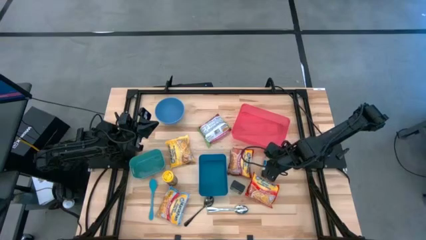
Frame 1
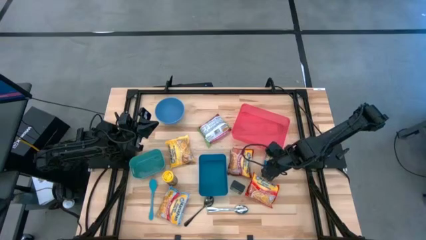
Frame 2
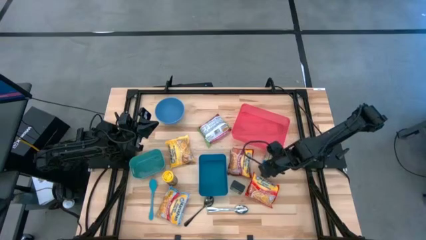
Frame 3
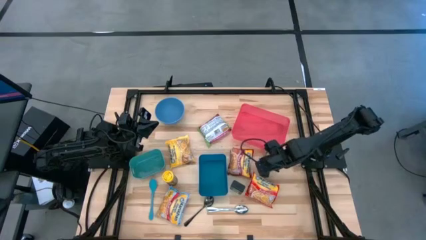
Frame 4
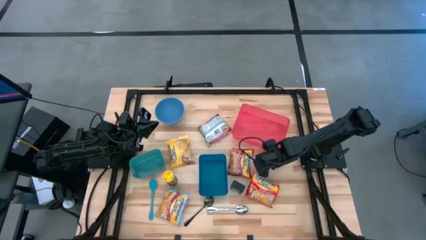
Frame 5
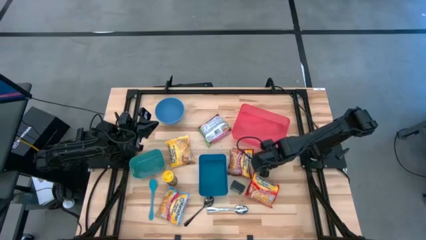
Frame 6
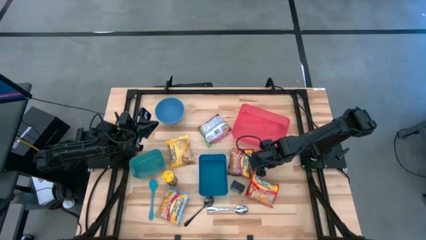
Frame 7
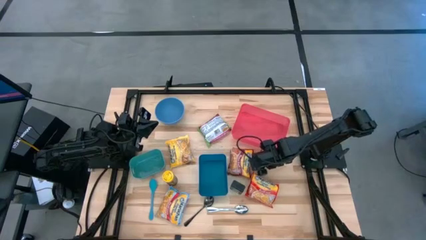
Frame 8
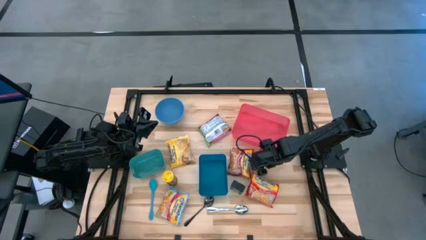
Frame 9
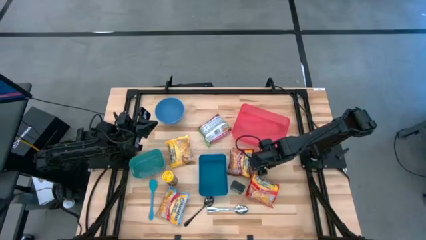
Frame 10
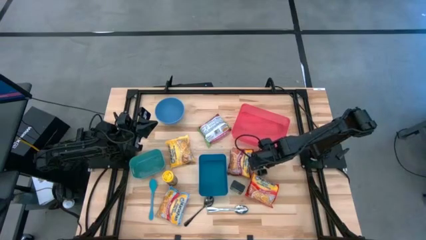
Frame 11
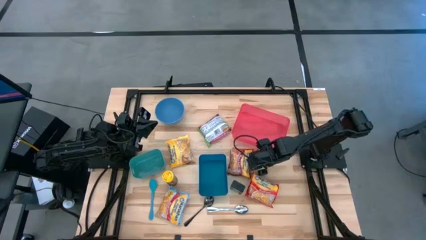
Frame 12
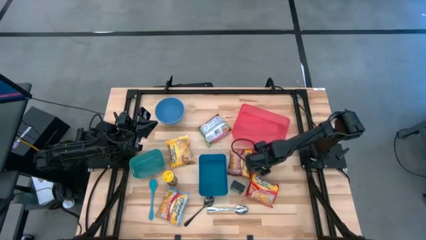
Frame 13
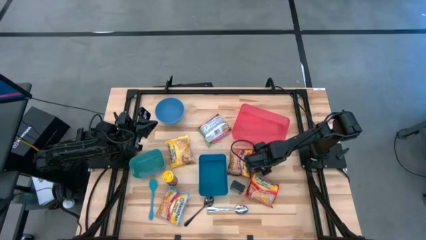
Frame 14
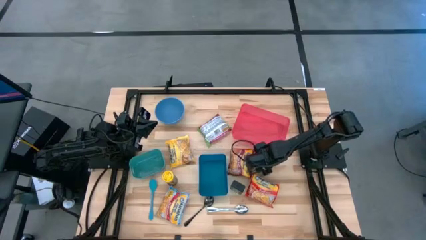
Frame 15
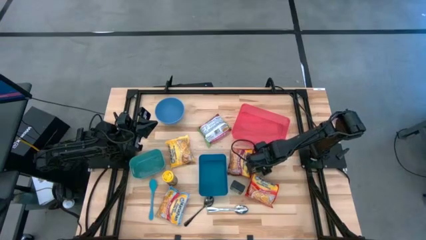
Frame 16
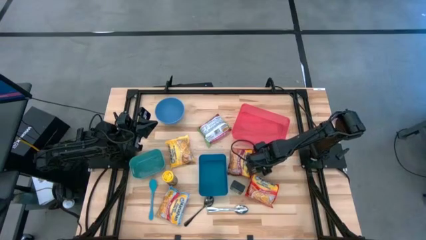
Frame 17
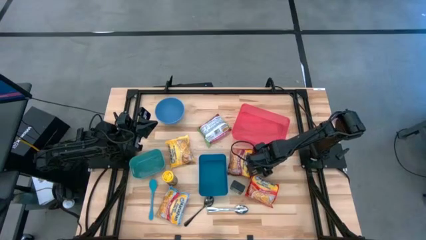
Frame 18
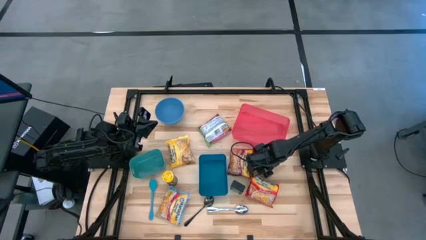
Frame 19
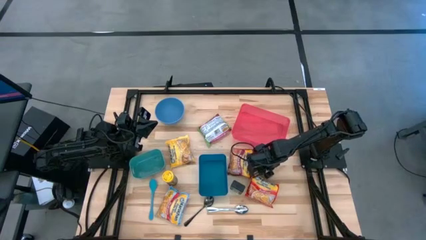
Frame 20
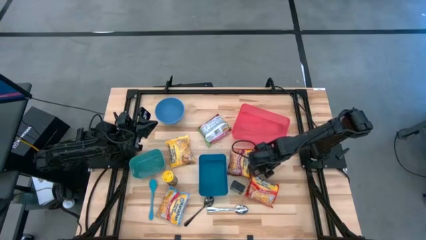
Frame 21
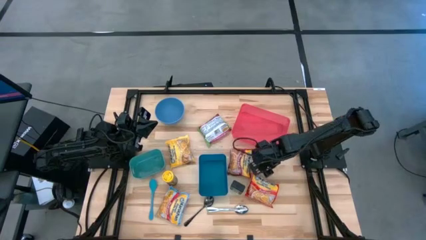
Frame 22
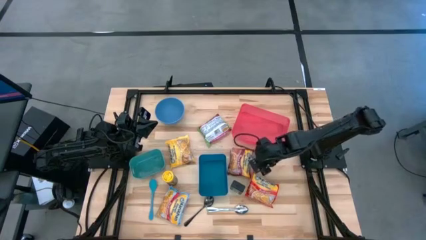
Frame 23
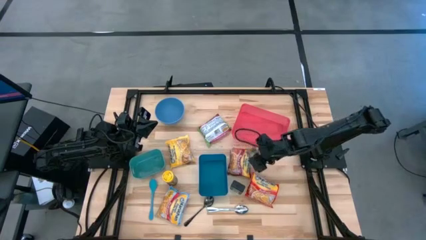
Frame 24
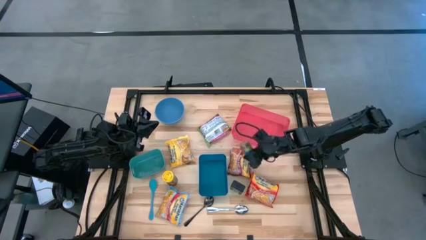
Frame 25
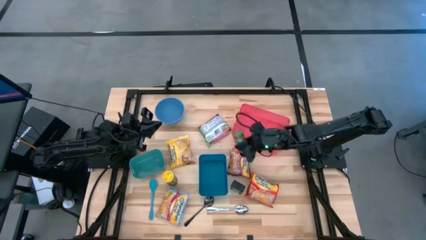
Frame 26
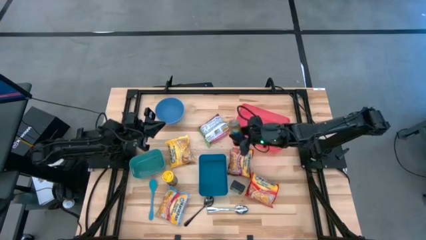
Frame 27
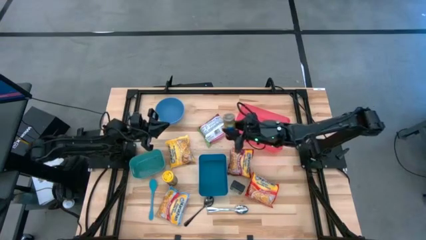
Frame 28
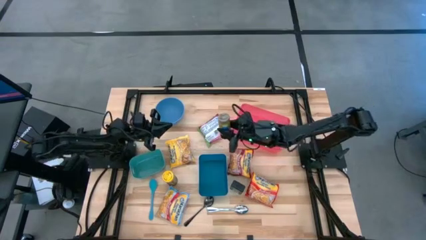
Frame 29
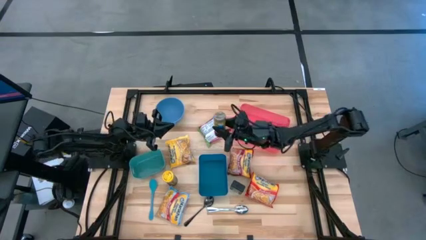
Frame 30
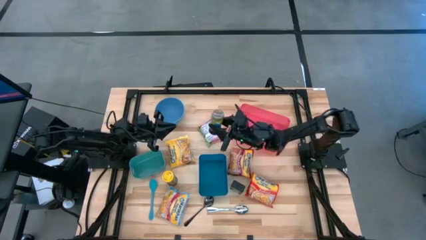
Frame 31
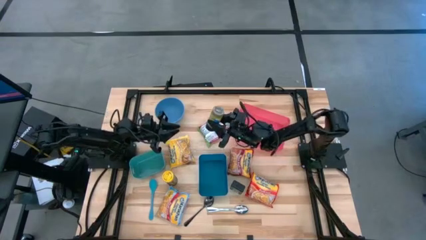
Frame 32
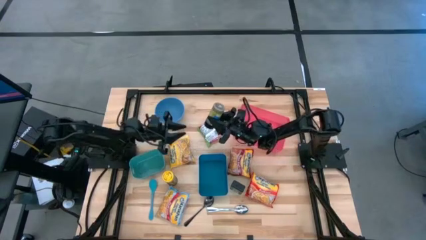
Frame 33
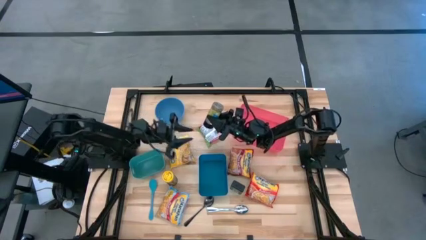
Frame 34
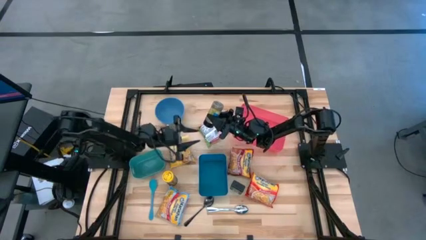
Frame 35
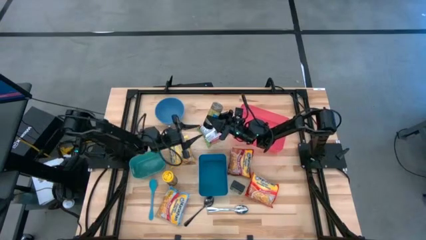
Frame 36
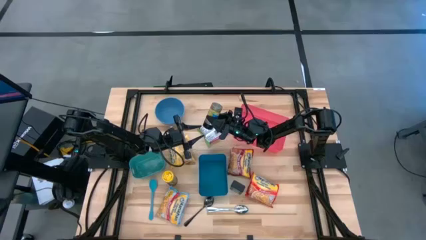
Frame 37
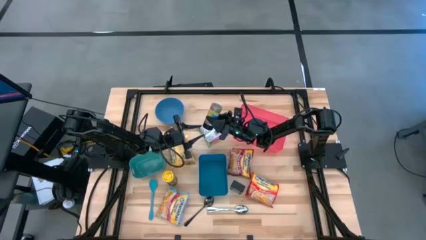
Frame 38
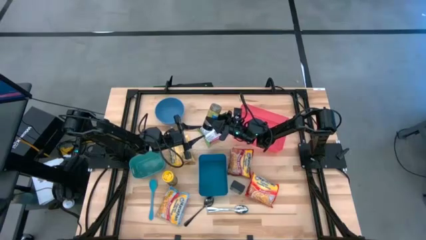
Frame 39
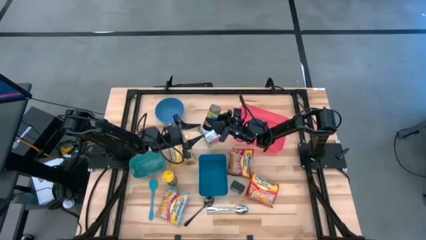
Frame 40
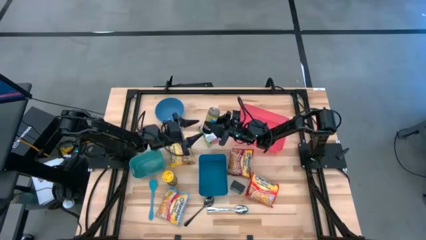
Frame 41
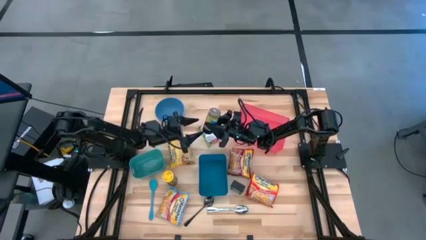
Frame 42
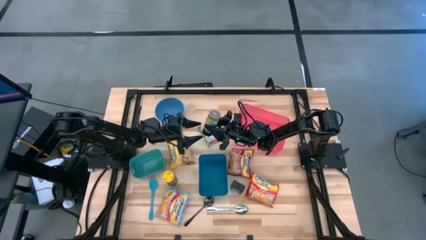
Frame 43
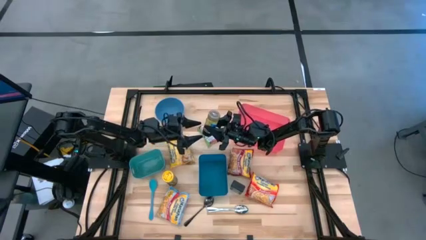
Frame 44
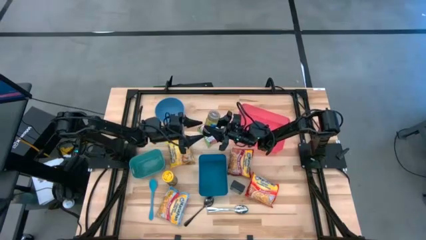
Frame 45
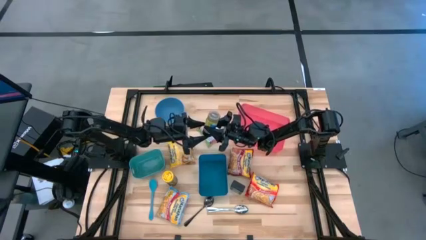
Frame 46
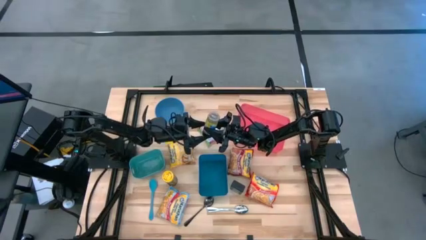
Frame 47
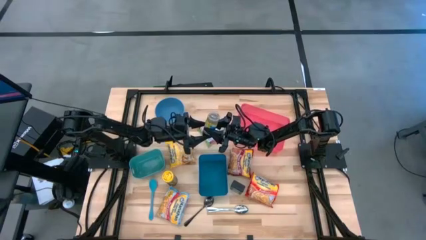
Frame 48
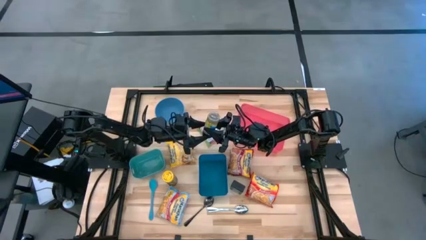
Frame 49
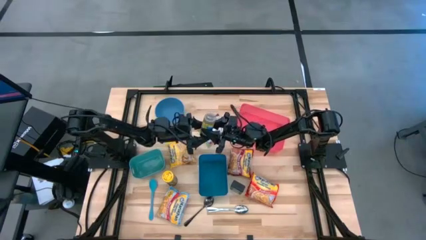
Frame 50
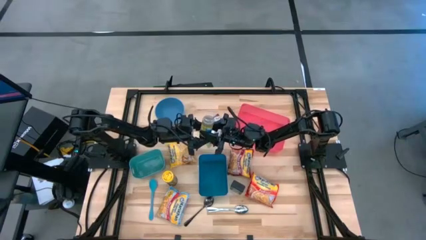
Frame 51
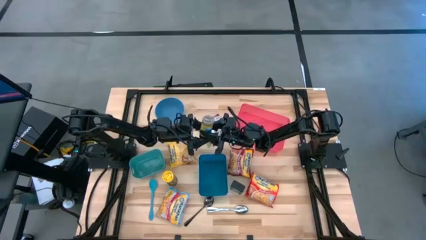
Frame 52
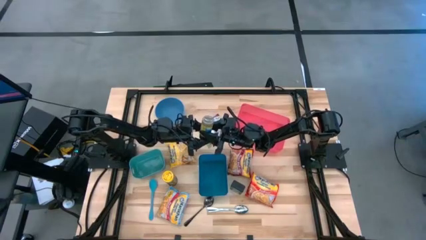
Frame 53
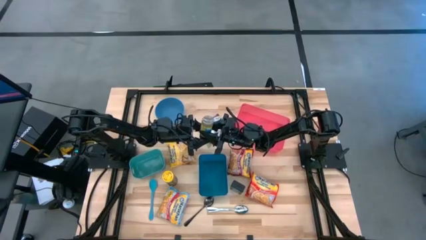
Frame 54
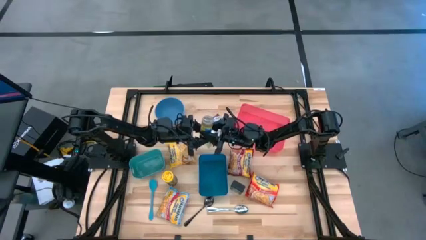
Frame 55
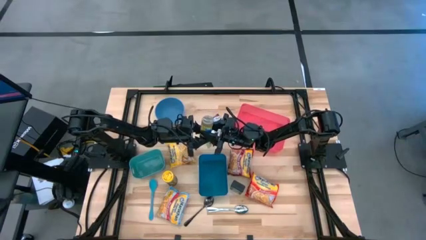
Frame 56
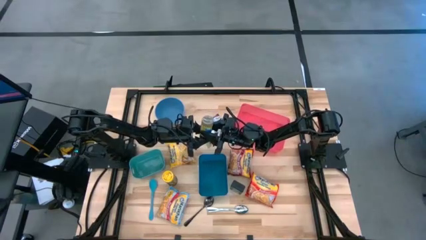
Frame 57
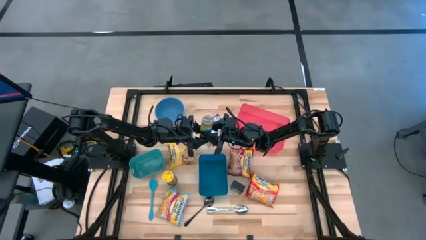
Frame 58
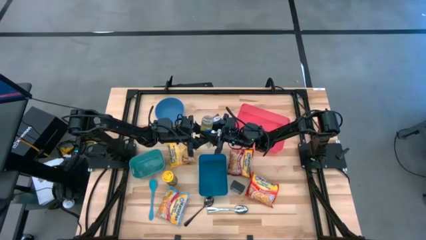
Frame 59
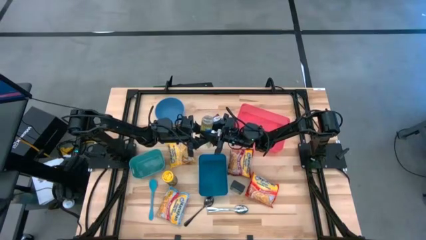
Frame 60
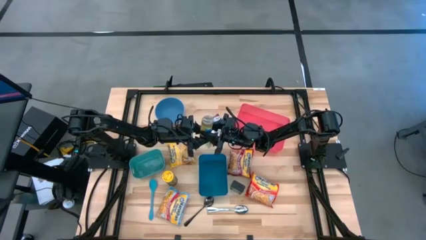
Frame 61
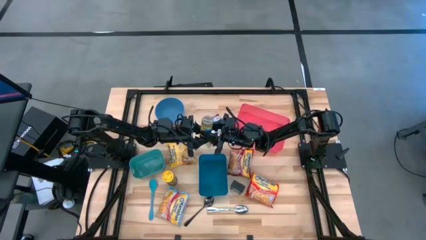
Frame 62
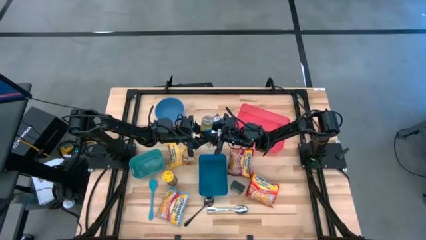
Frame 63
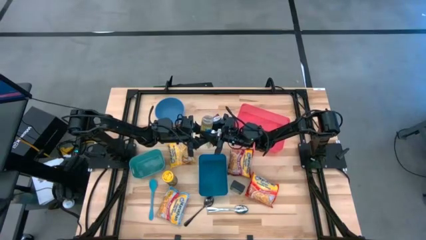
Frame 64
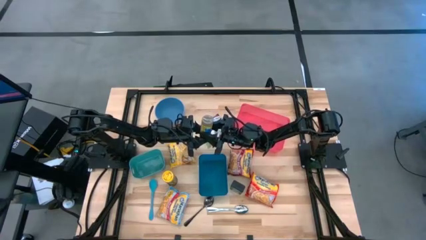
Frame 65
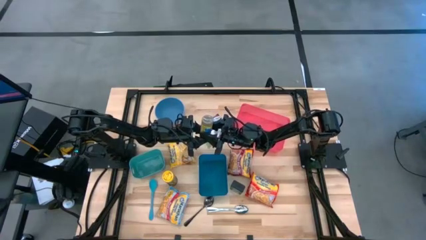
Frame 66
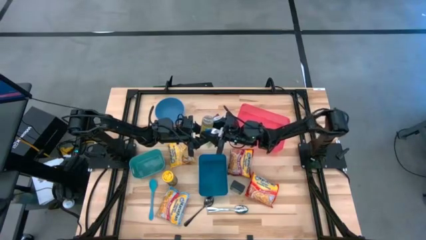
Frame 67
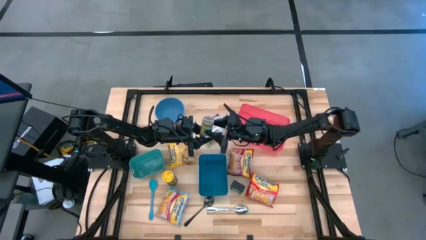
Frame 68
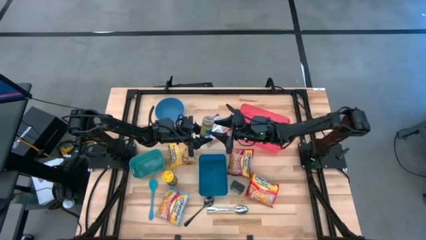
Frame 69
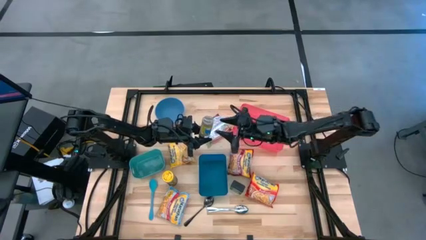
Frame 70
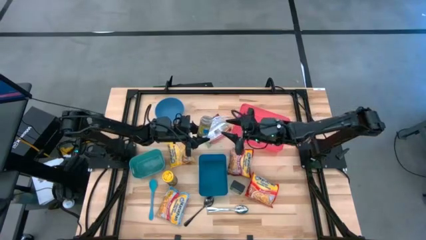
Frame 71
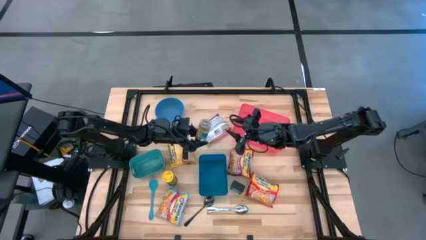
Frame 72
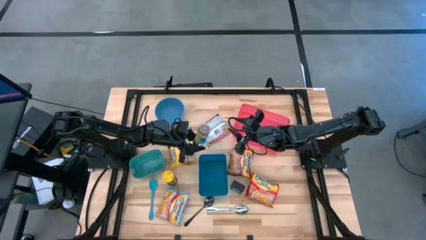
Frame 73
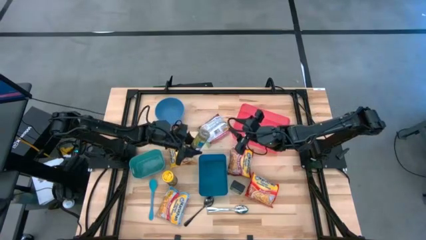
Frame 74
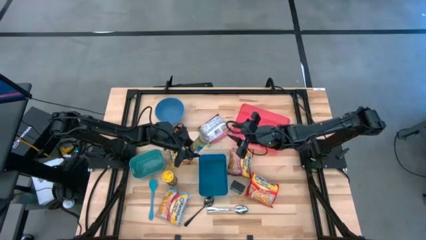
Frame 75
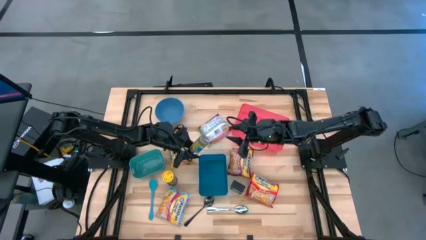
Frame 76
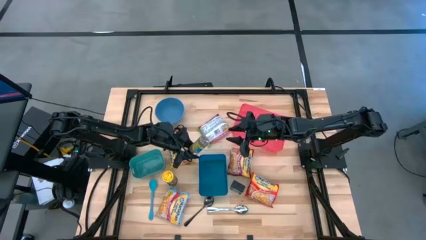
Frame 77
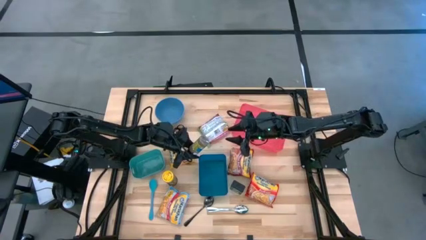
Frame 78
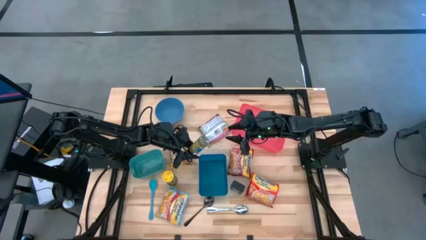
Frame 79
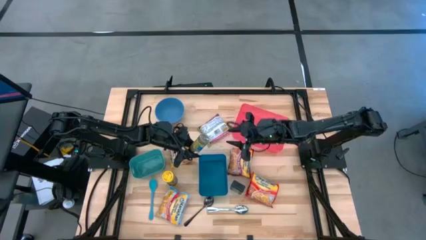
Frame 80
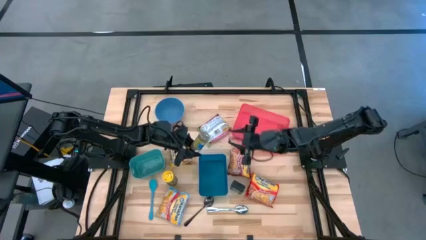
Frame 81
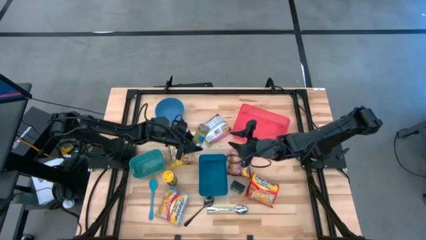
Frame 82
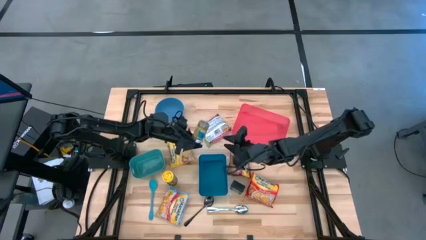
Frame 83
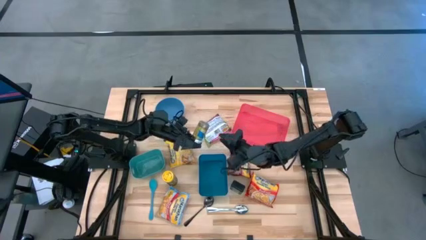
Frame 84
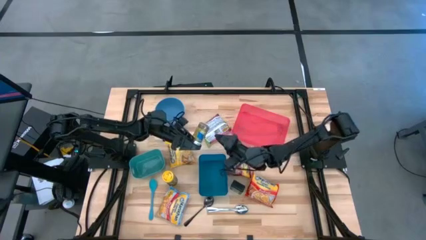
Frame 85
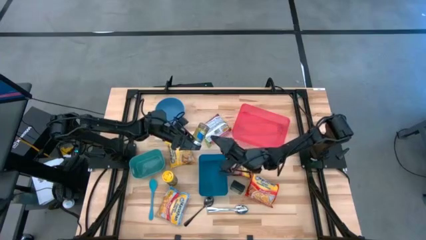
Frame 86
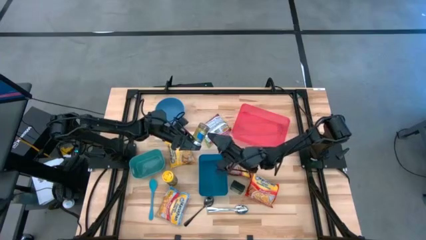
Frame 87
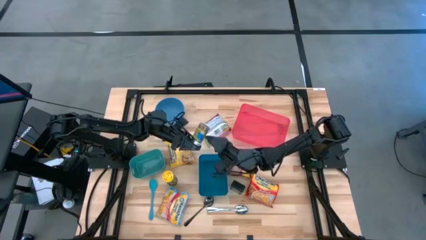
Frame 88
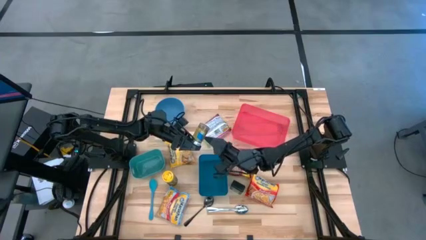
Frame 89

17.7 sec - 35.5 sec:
Task: Pick & Place Food Item
Put the green seasoning bottle into the blue bin
